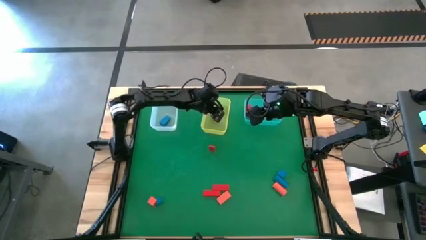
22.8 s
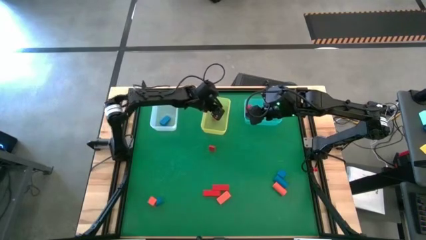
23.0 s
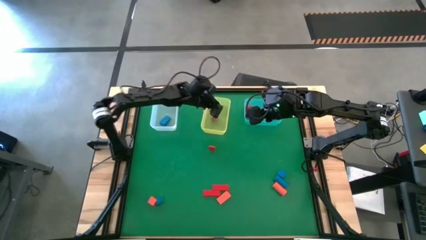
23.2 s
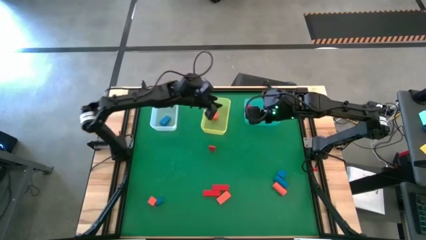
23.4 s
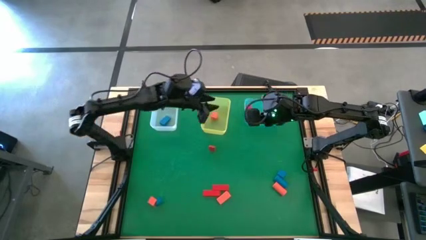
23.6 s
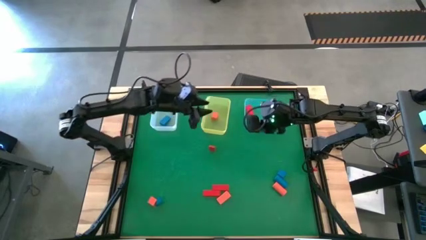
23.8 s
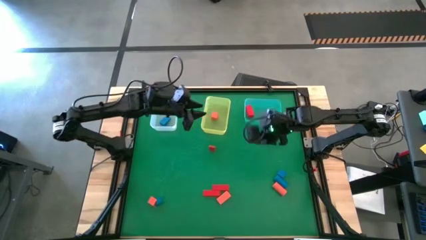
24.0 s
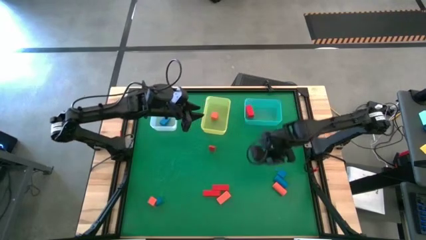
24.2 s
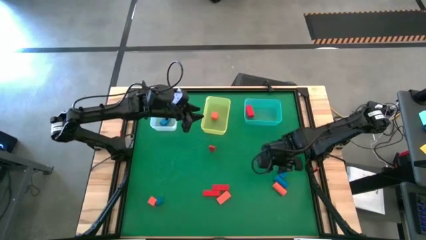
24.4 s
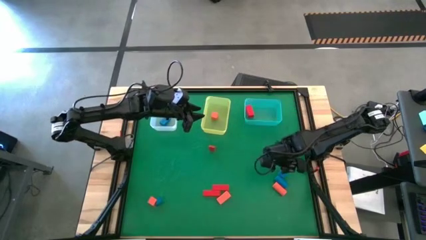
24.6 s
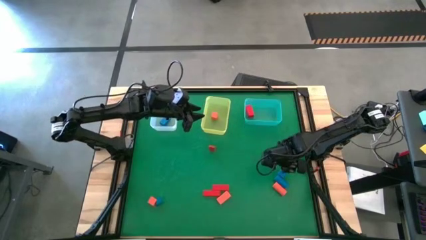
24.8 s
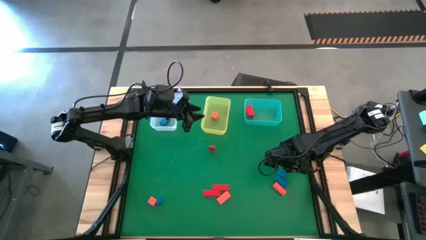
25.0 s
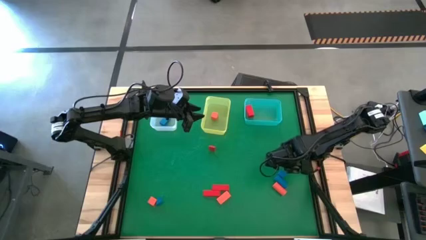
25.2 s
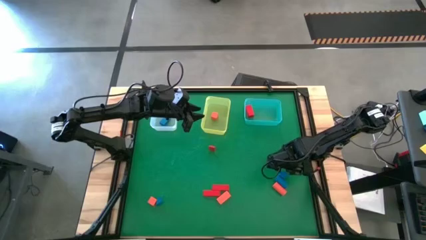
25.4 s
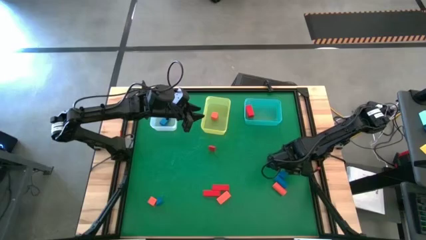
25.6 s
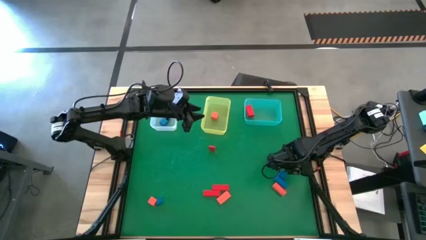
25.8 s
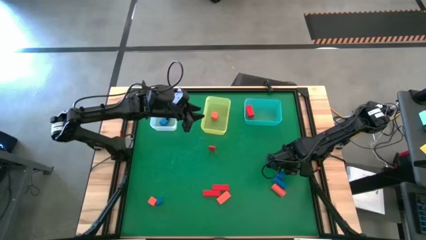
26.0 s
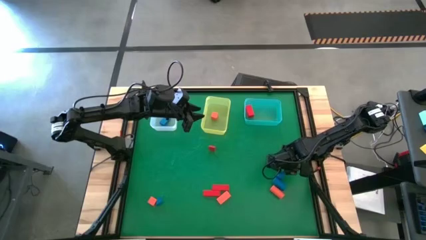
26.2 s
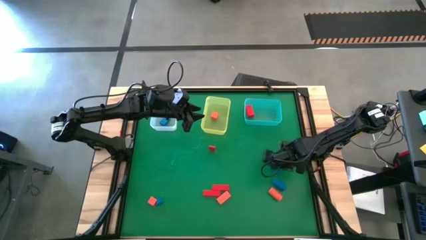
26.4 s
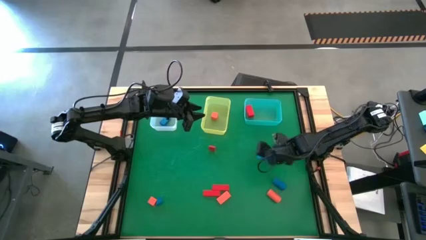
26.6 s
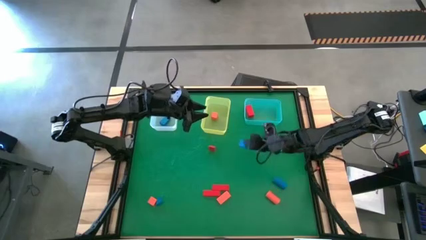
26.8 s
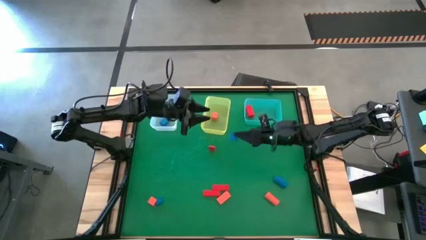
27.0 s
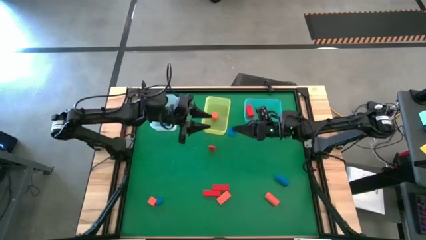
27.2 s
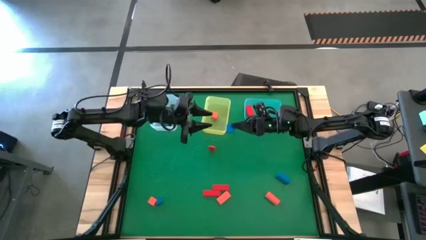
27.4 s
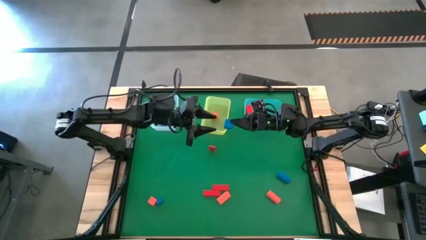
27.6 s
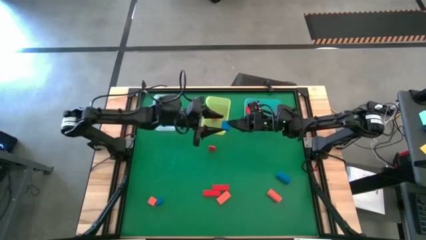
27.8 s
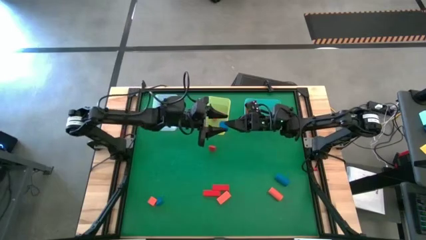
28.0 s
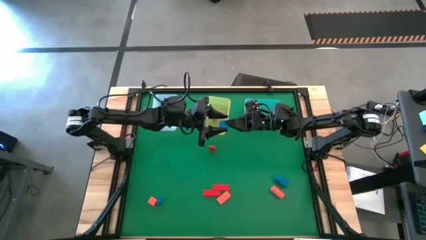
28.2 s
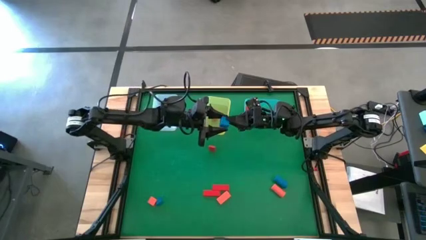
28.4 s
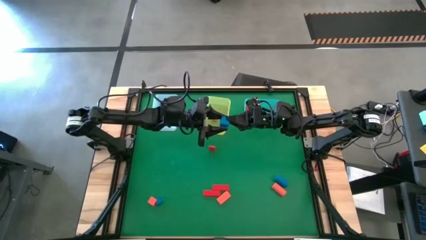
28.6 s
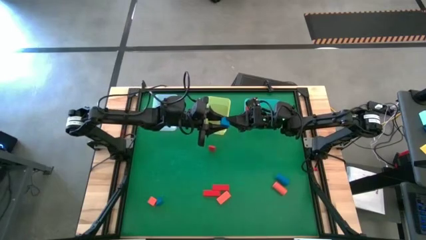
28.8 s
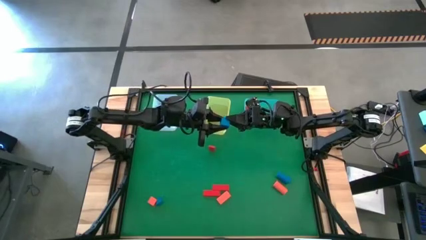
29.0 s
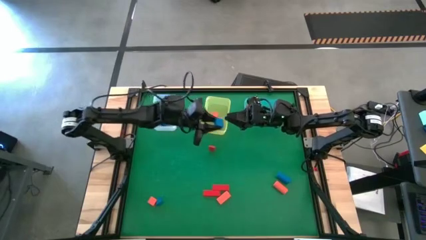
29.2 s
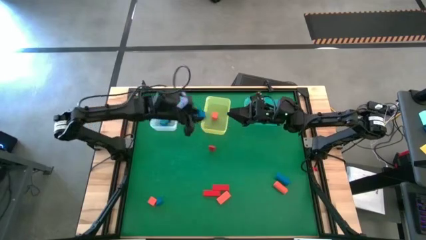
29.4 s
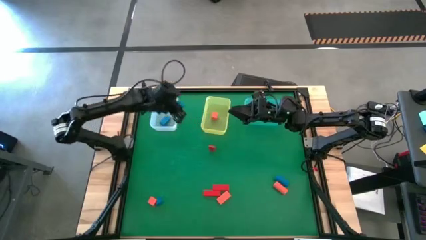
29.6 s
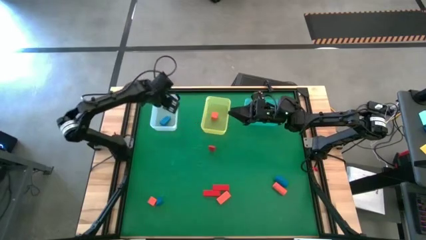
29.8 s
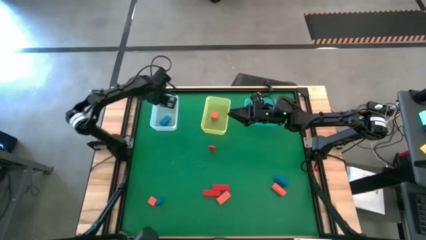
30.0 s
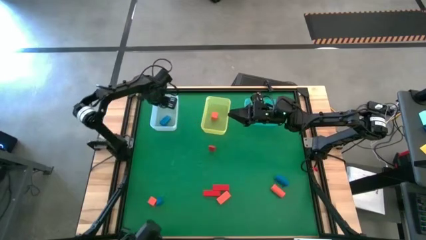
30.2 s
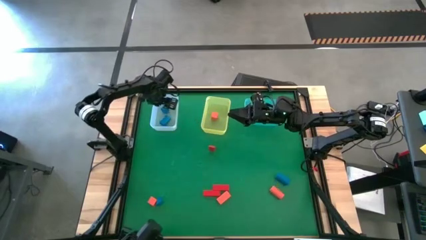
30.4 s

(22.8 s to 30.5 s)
Task: Sort & place blocks by color
Put the blue block into the white bin

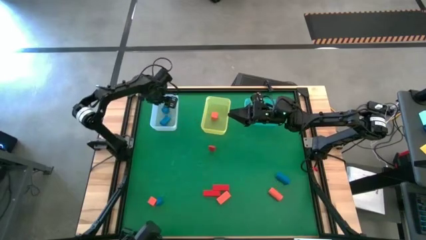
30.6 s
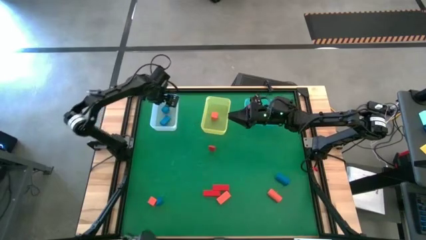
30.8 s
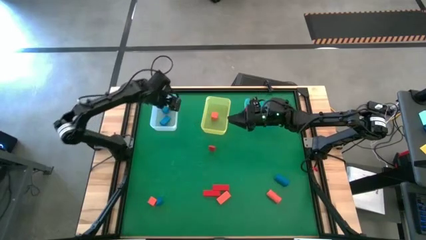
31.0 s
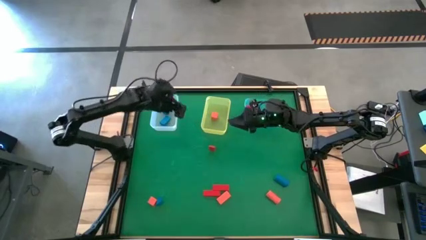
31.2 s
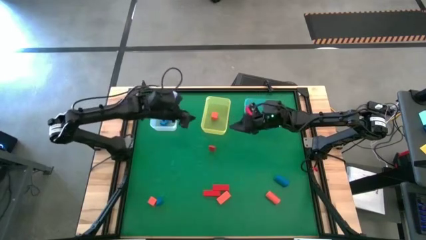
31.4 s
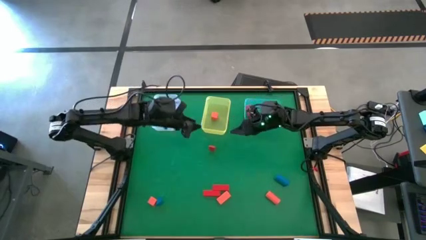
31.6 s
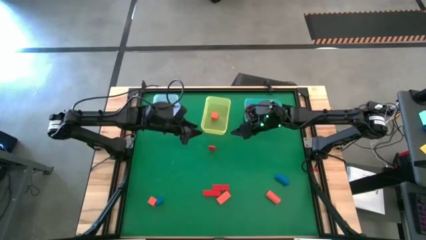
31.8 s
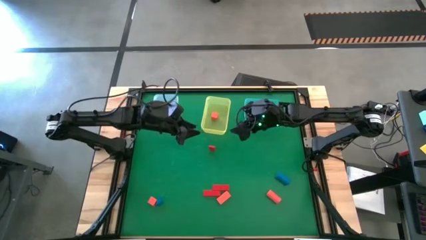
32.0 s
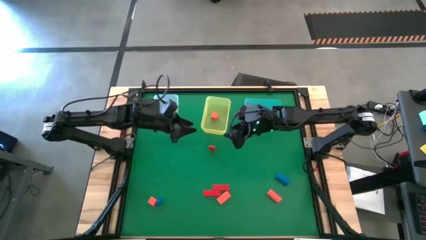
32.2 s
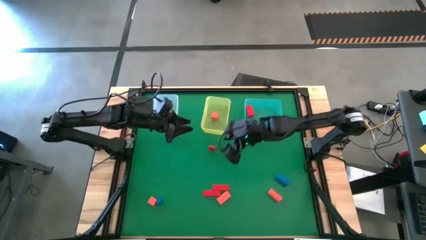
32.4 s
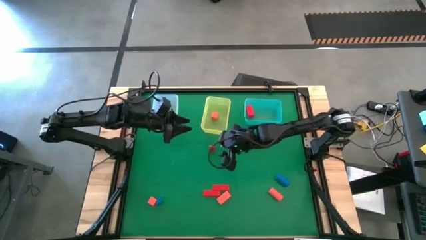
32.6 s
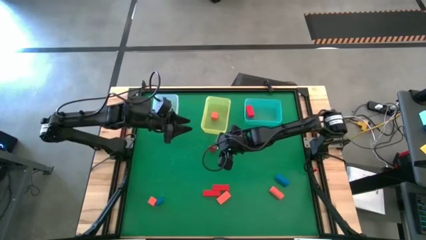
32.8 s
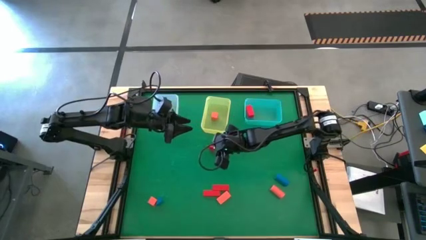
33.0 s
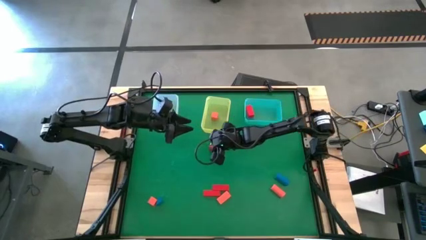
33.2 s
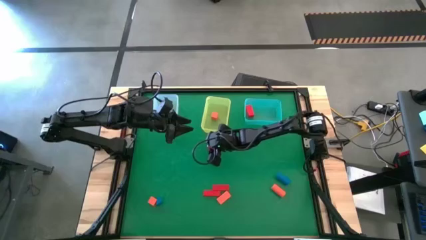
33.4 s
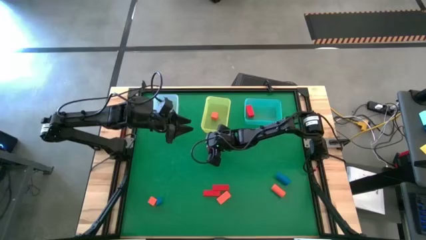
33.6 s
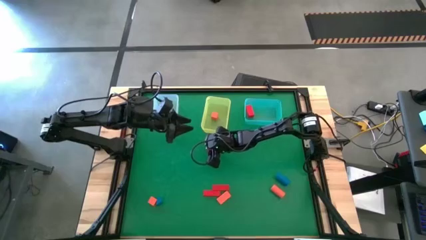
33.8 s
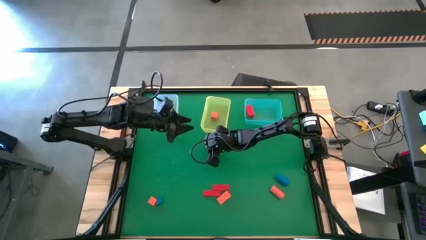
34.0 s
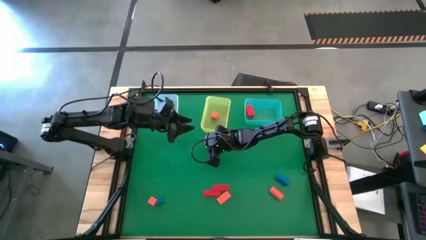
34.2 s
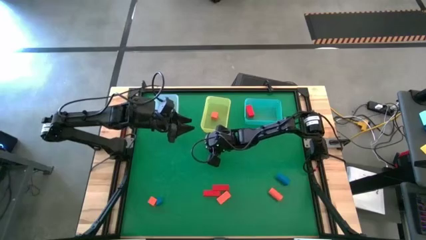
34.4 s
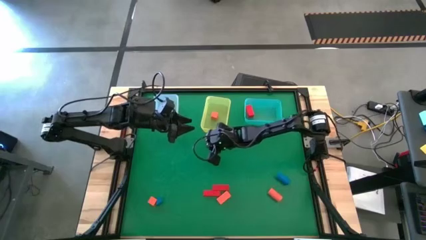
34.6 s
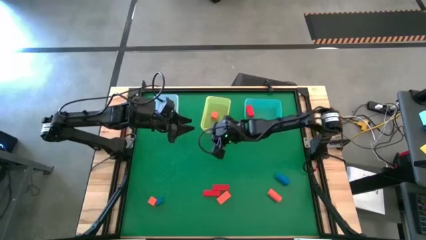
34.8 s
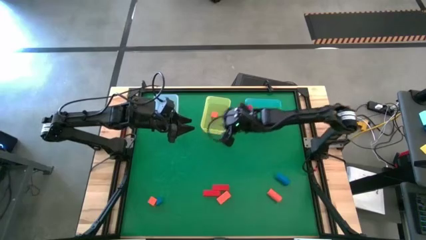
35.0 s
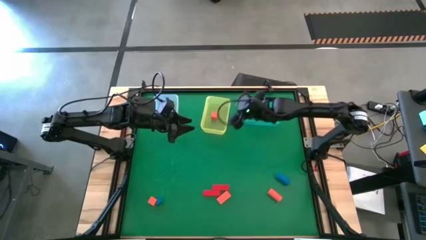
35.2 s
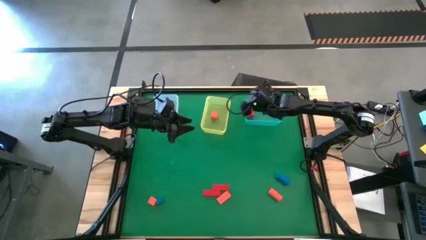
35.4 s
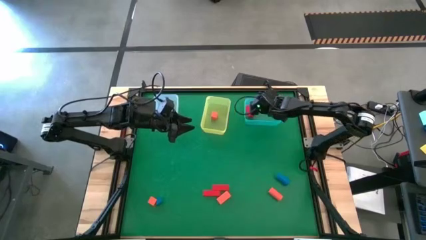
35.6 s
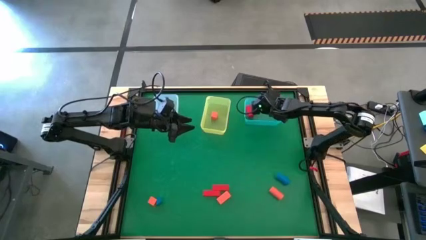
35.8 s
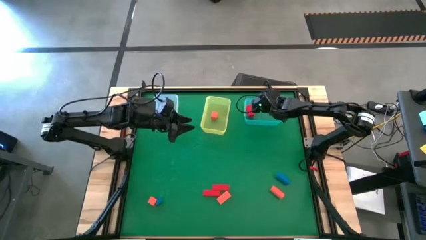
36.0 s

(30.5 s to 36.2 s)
Put the red block into the blue bin

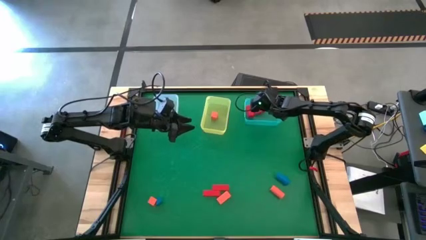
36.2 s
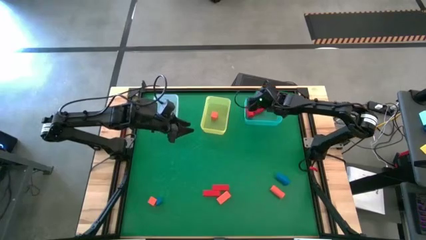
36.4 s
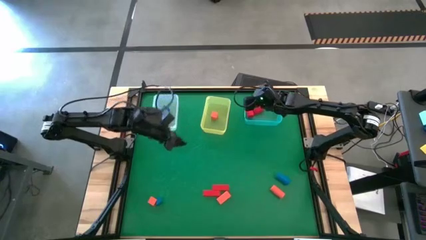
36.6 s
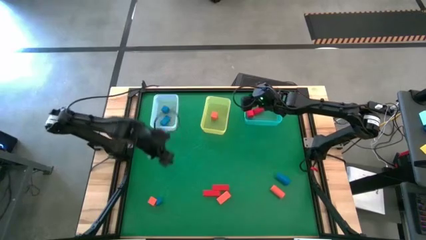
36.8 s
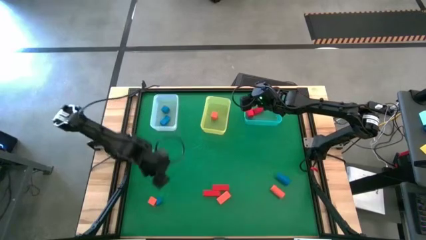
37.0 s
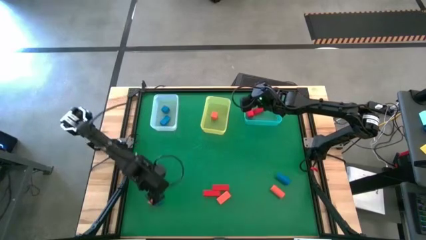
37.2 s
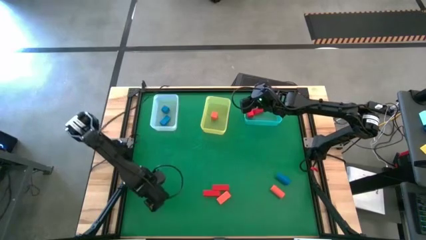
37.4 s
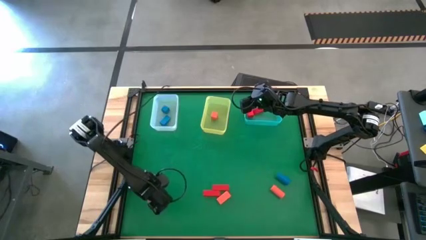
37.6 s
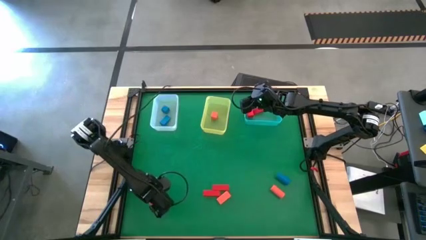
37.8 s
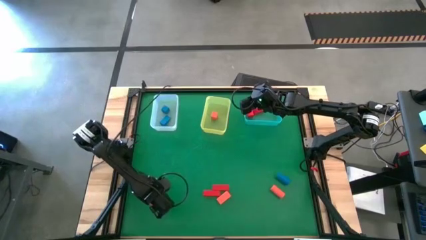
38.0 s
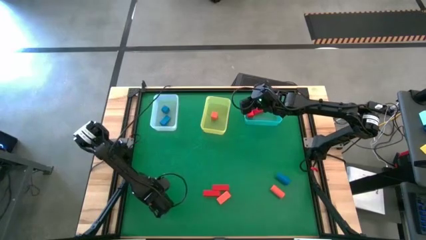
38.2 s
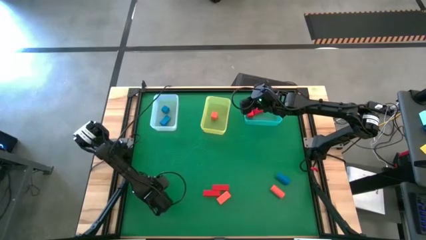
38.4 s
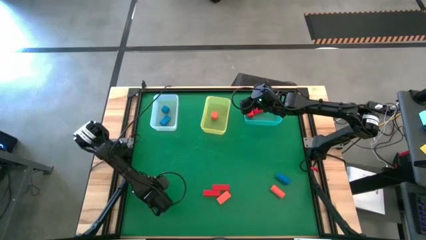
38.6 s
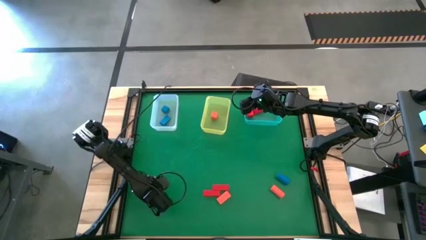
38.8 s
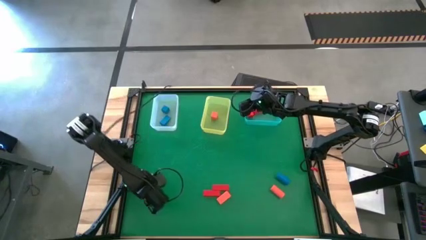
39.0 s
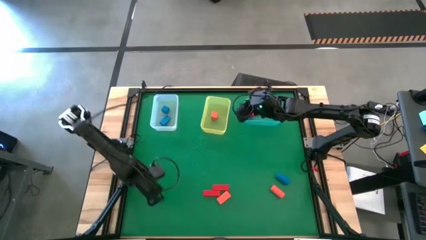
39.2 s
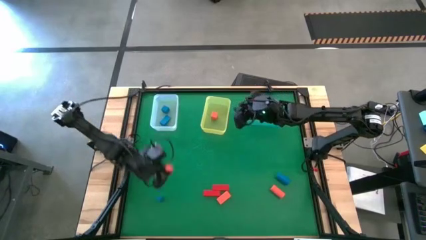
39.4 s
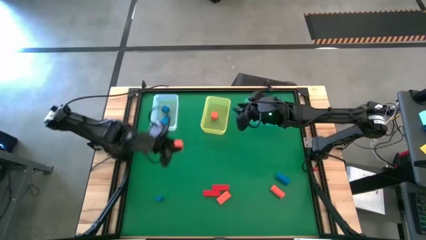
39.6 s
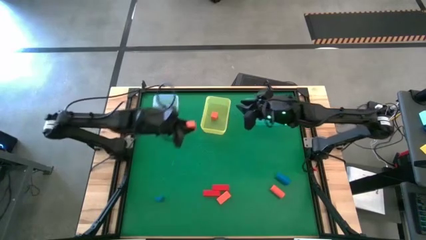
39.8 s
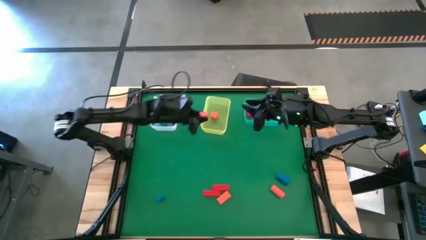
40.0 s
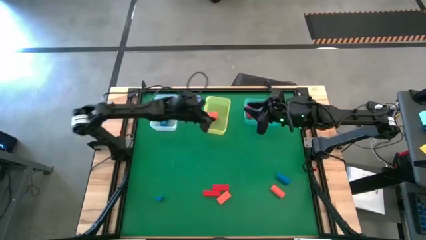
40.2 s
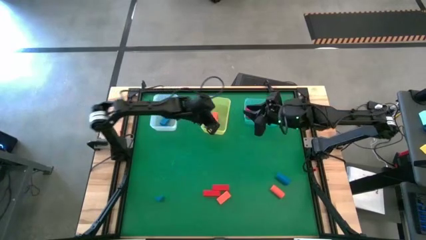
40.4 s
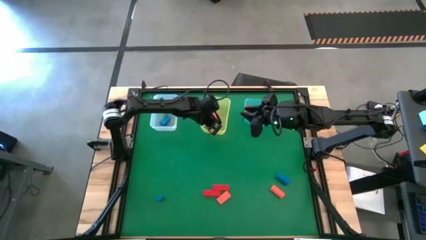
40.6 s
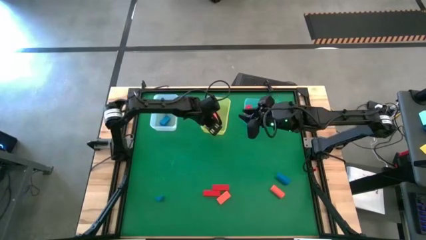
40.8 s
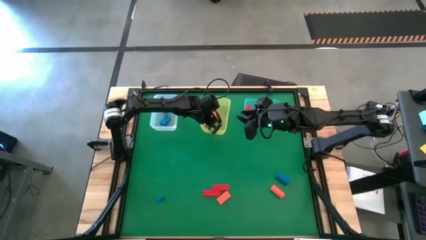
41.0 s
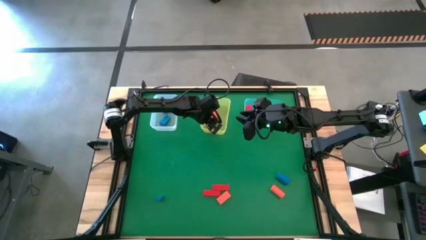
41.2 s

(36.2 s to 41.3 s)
Put the orange block into the yellow bin
